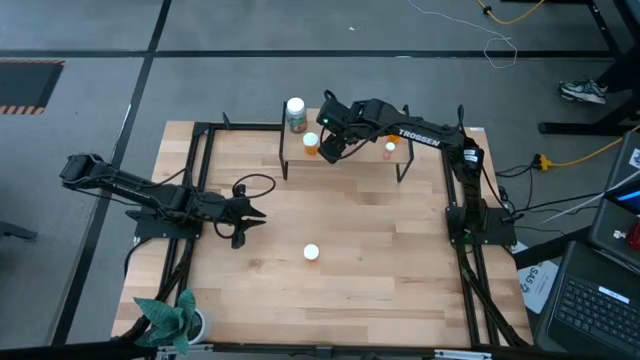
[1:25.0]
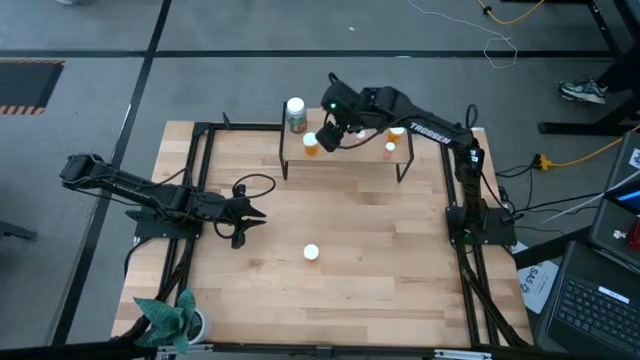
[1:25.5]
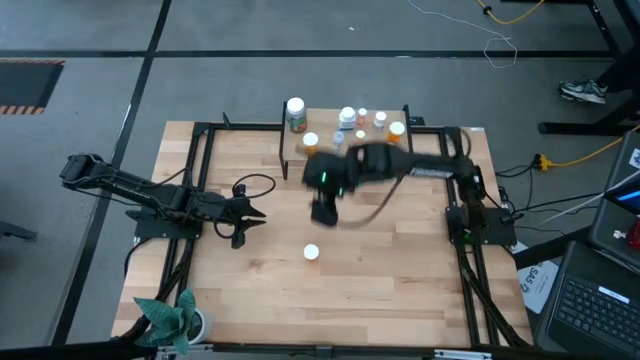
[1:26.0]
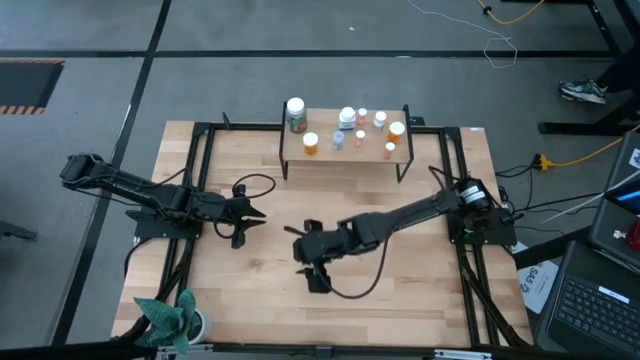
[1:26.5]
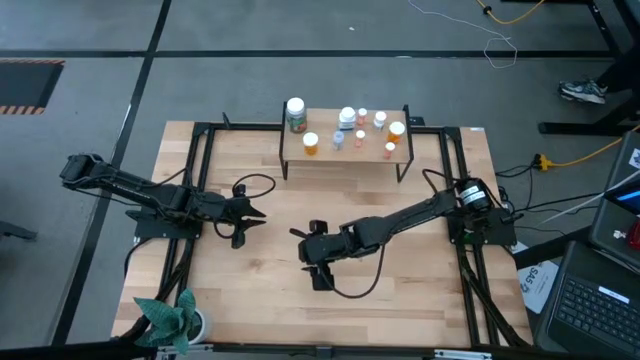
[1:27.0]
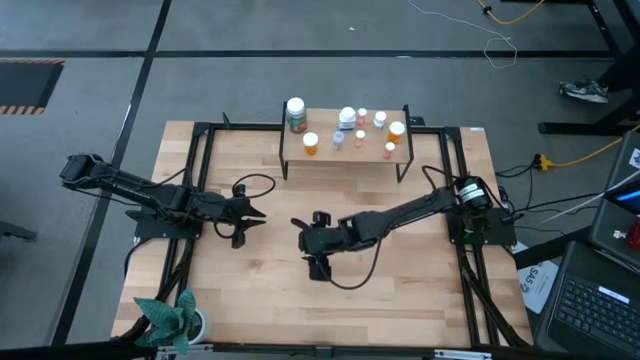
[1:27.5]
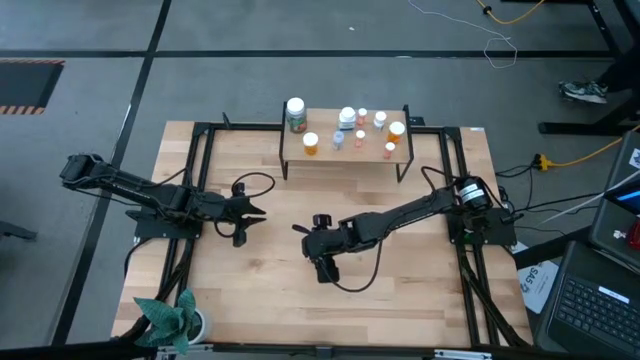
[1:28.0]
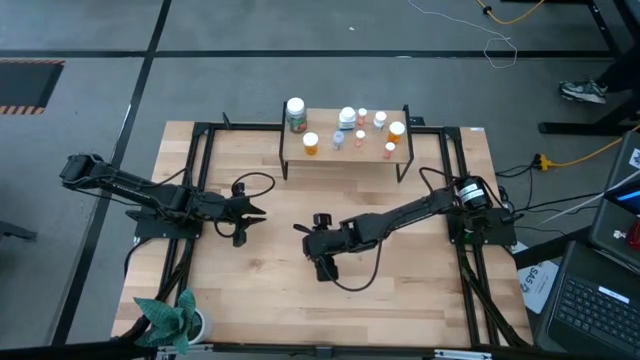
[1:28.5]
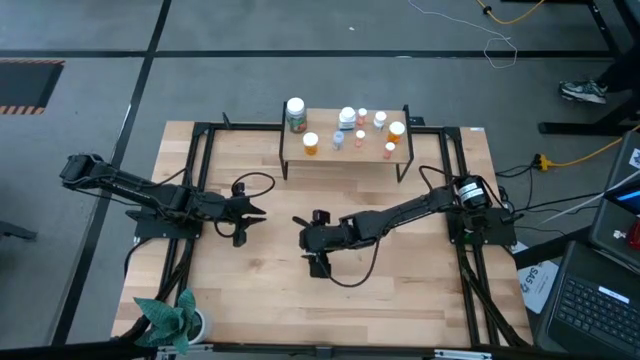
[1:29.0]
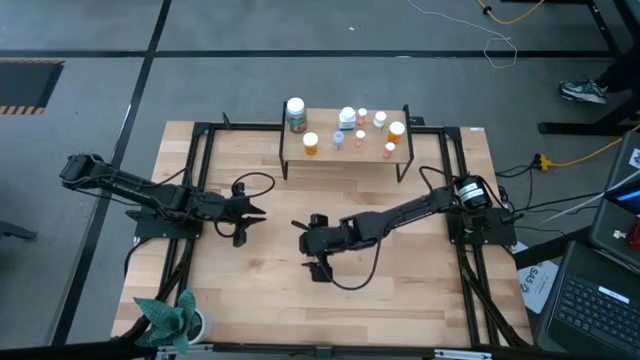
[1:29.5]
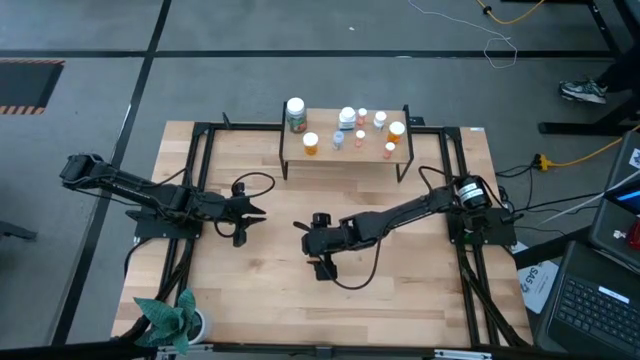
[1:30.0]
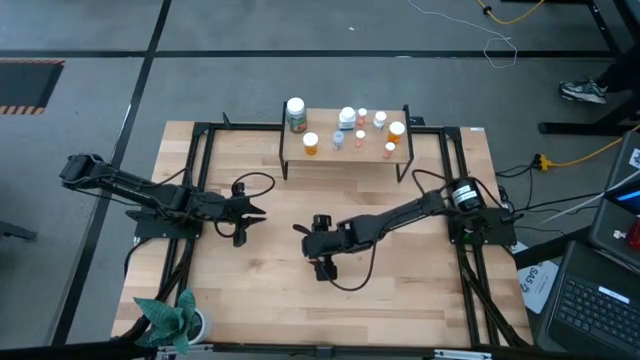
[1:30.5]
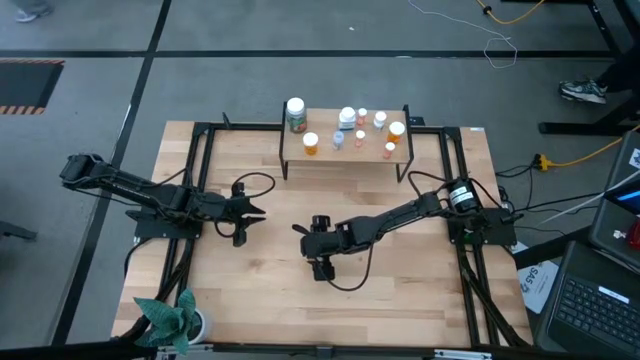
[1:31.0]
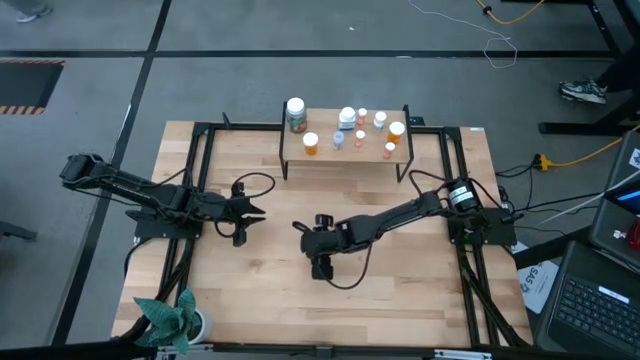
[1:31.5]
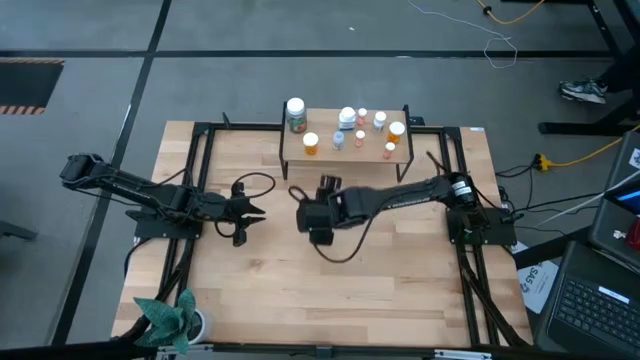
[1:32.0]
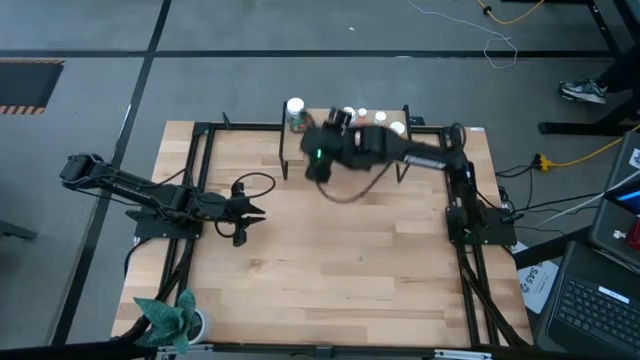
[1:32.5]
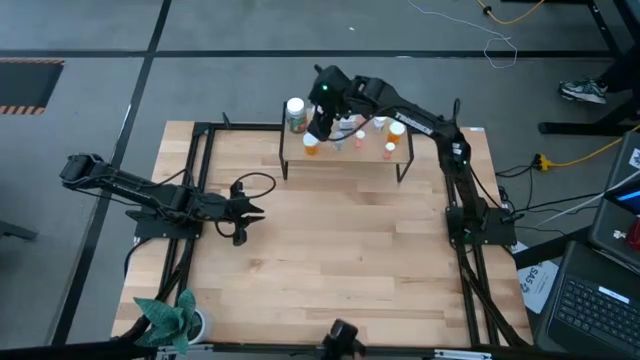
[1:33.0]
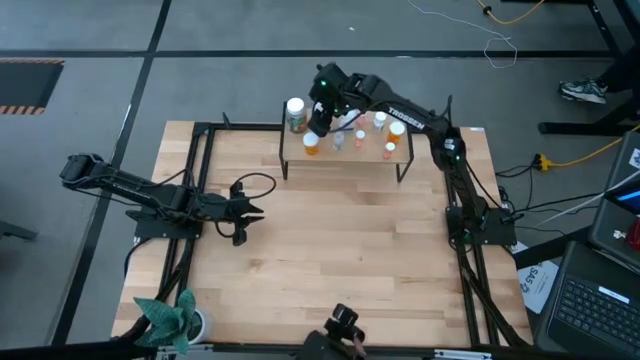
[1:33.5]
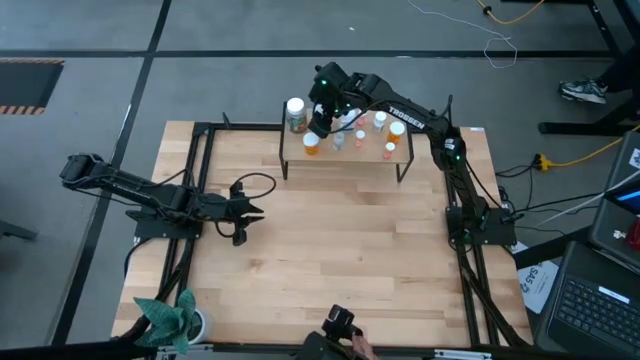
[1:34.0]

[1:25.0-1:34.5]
Task: Pick and place medicine bottles onto shelf by color
Put the orange pill bottle on the shelf aligned with the other orange pill bottle

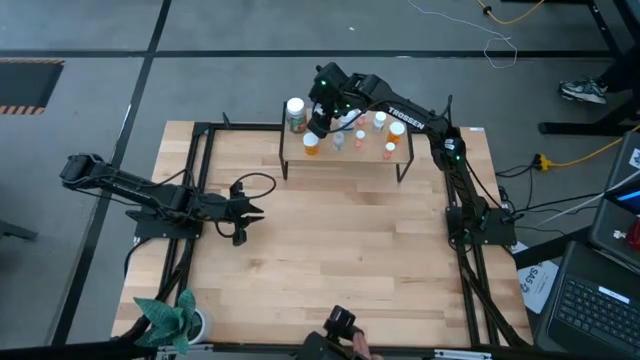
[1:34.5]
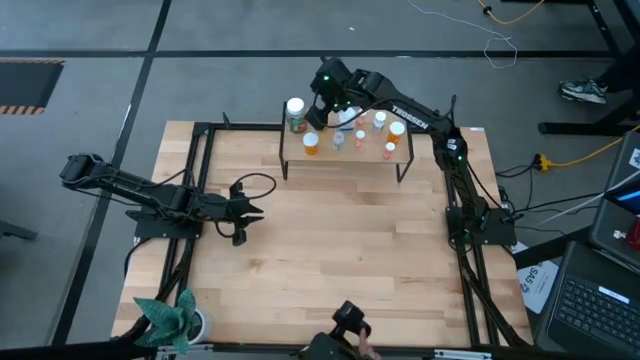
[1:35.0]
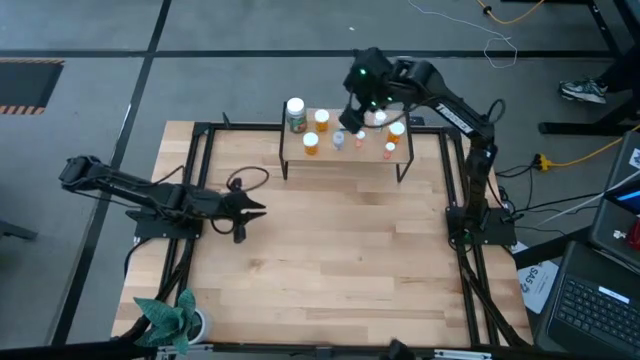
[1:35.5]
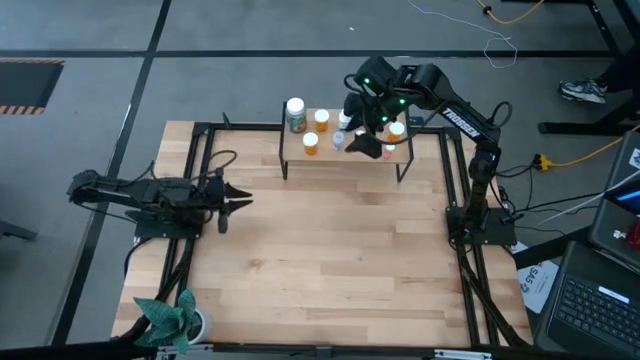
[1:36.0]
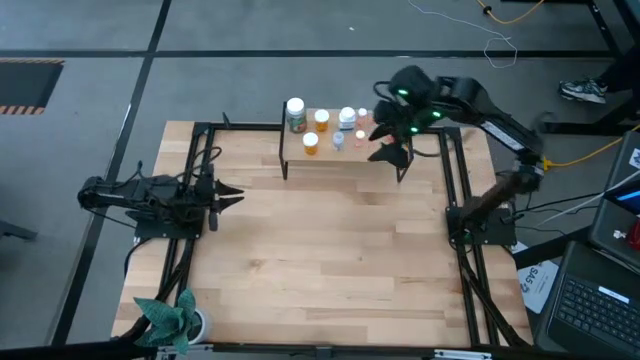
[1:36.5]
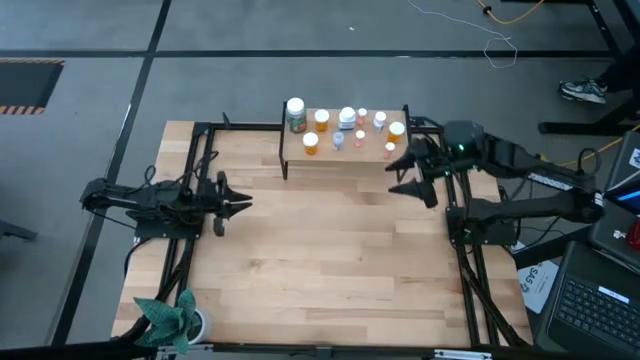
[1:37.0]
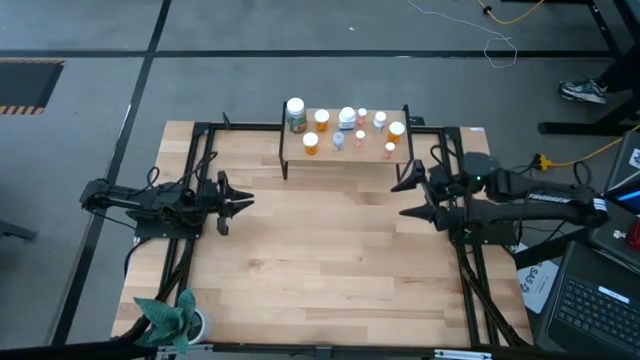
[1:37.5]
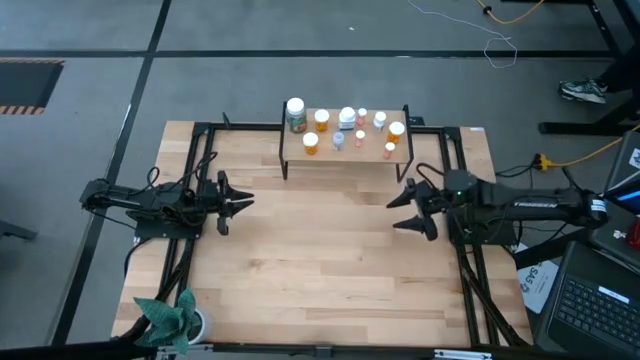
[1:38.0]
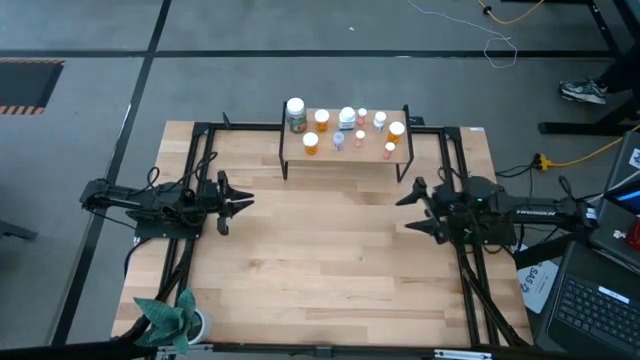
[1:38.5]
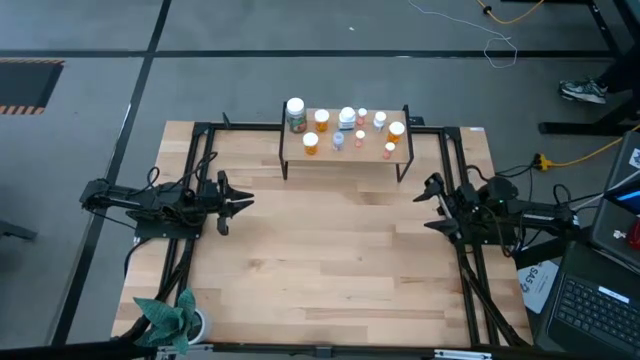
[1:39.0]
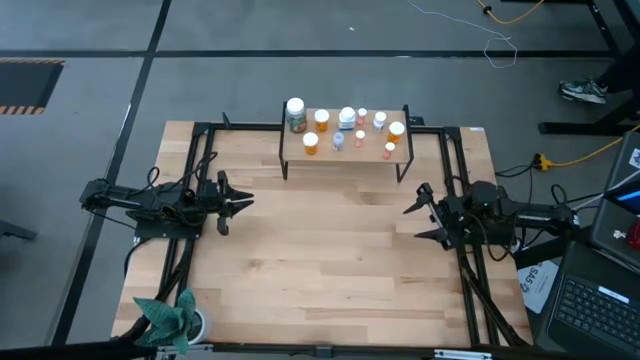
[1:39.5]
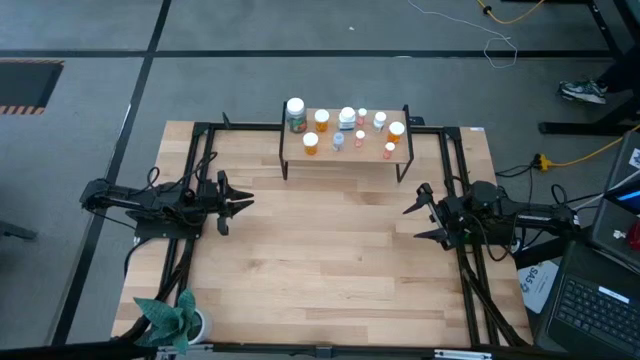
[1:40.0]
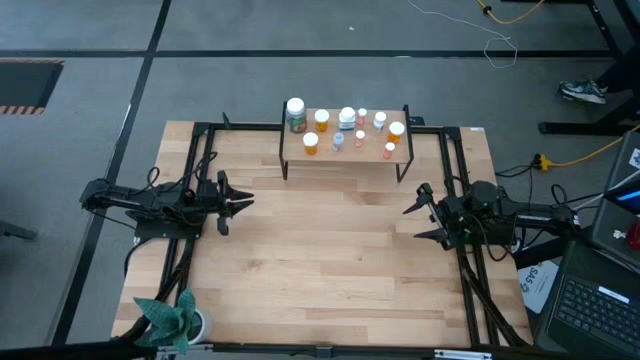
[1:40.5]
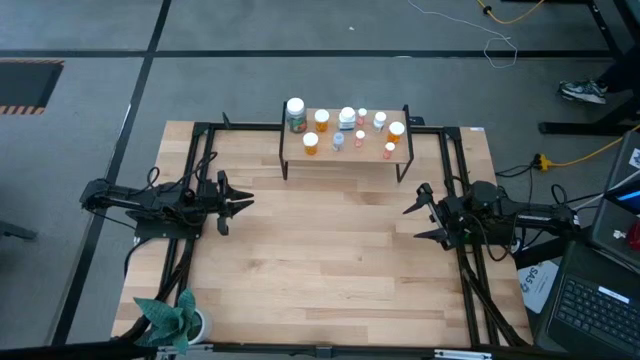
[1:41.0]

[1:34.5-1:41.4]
Return to Home Position

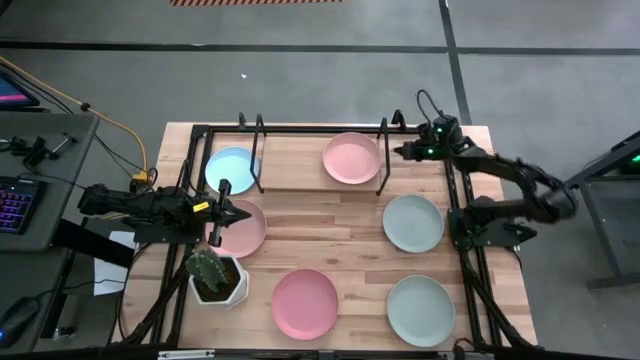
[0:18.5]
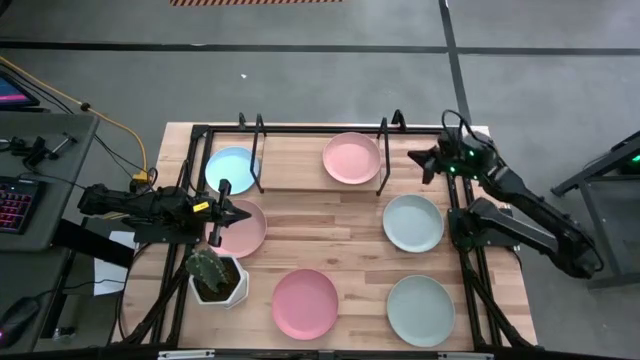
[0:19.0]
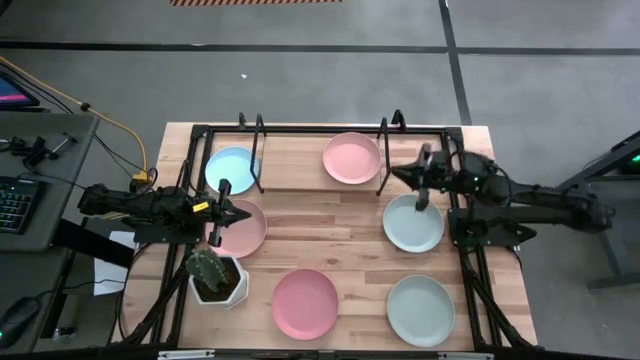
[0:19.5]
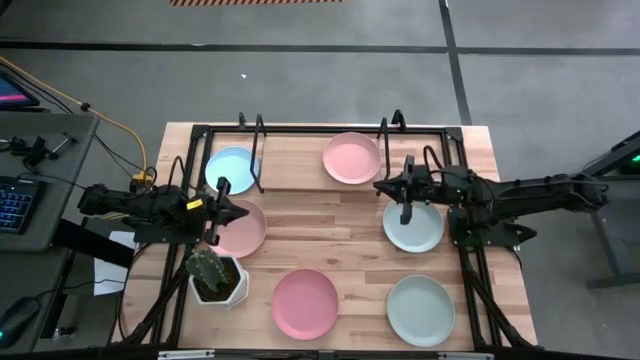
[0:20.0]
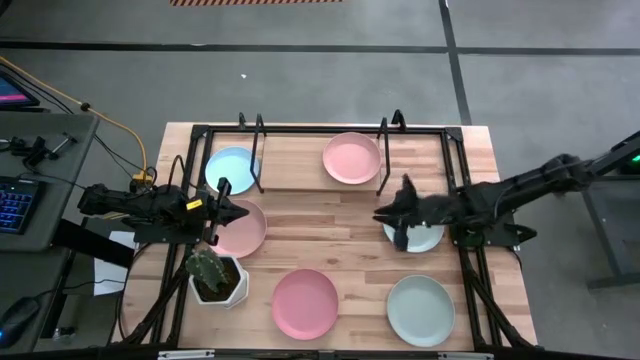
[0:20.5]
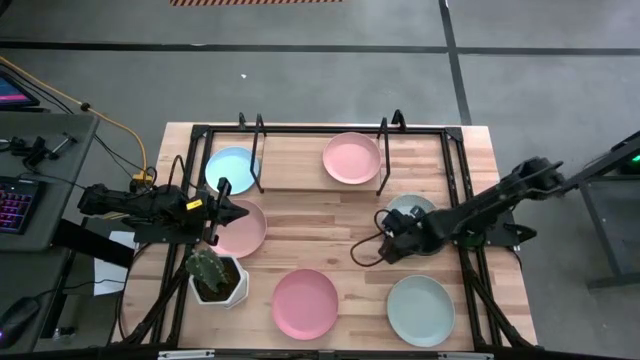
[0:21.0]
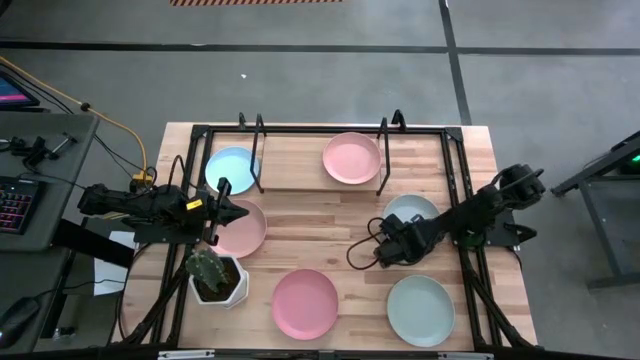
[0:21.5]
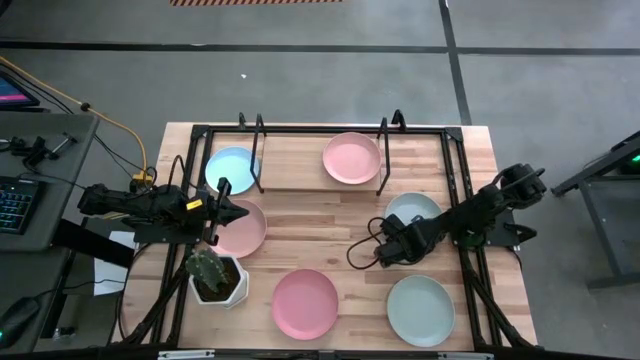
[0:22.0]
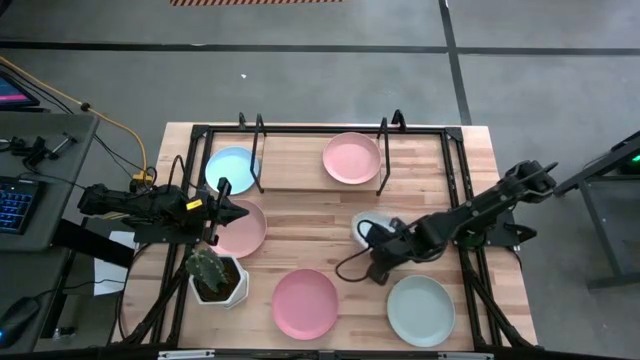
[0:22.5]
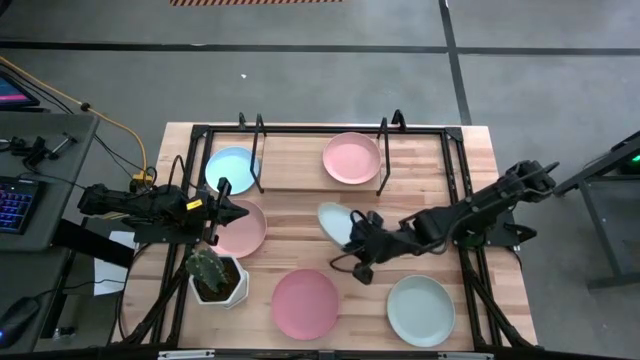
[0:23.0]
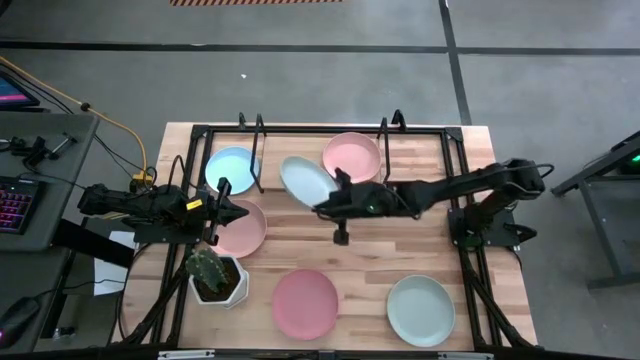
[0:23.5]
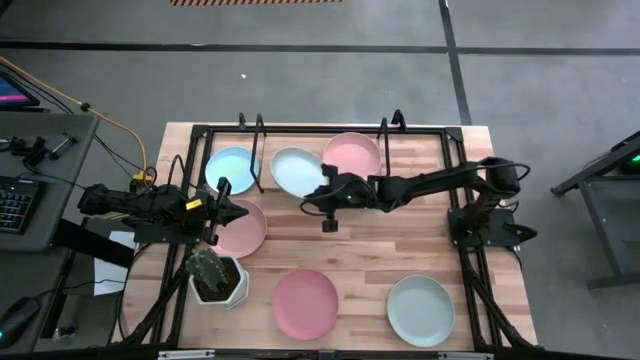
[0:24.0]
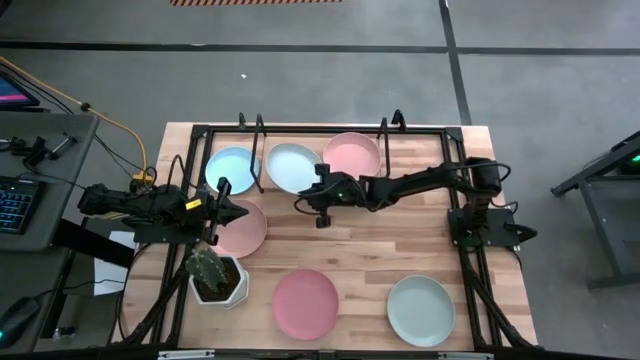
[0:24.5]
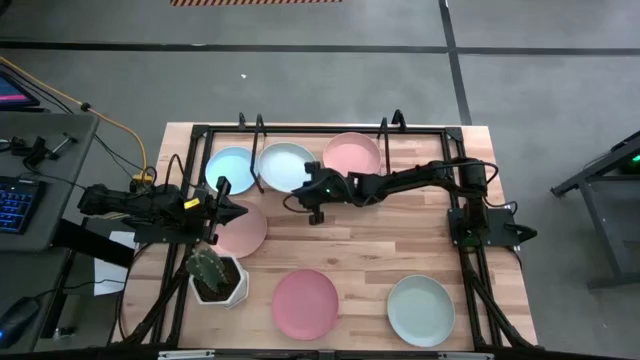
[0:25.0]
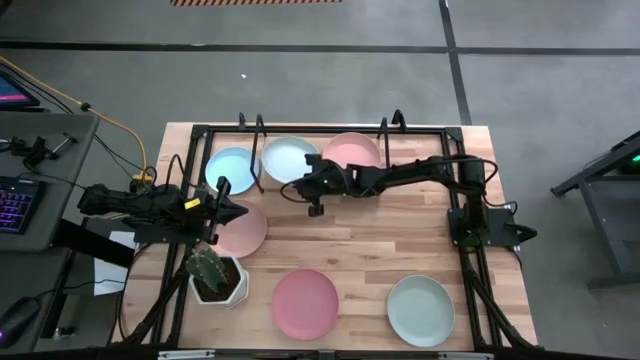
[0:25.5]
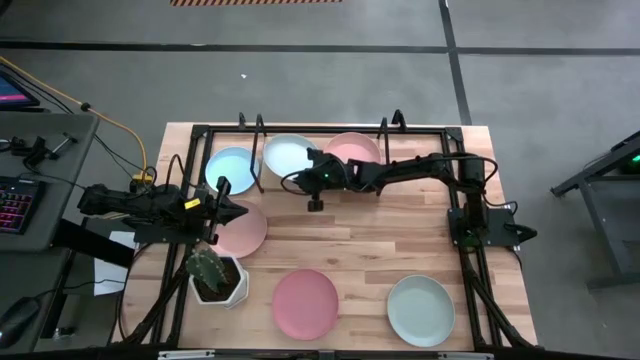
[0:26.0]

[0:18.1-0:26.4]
Task: Place and stack plates onto a shelf
Put the top white plate on the shelf
